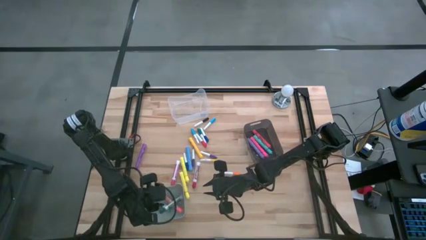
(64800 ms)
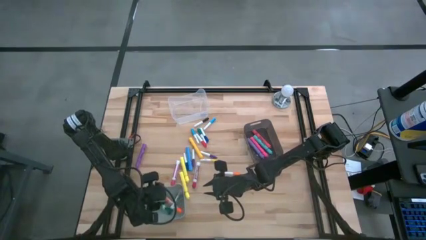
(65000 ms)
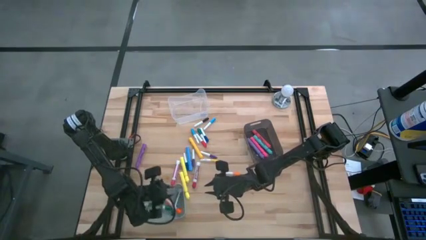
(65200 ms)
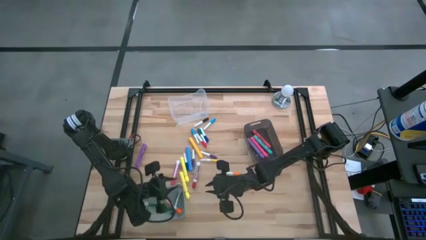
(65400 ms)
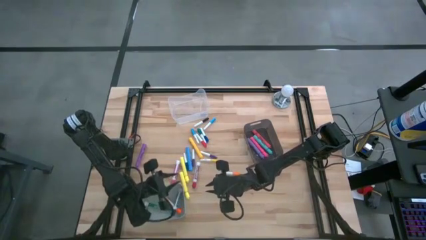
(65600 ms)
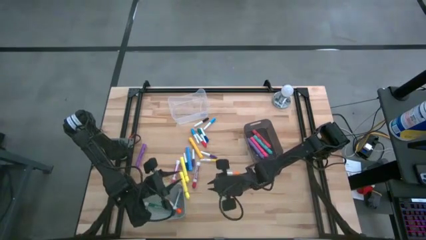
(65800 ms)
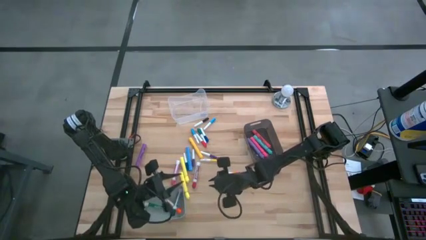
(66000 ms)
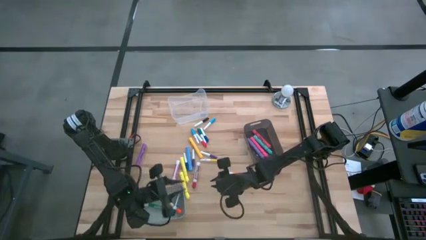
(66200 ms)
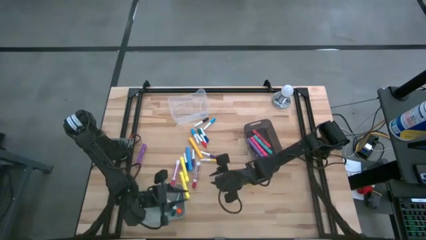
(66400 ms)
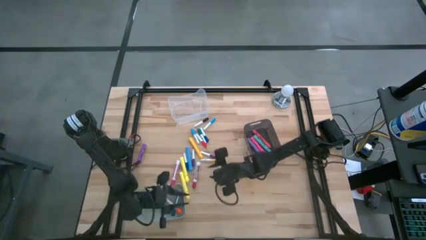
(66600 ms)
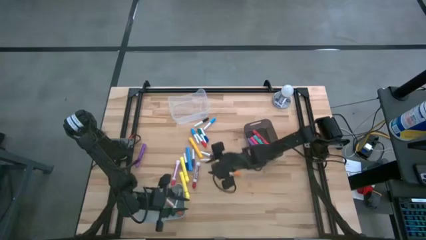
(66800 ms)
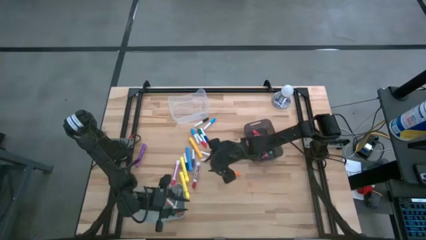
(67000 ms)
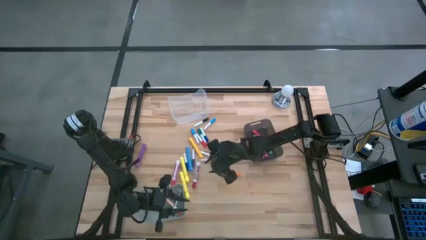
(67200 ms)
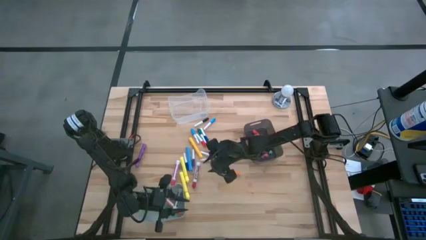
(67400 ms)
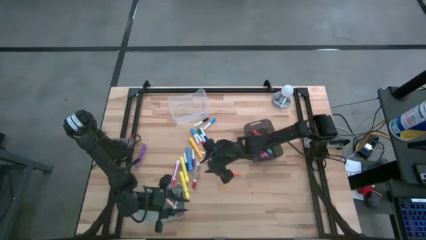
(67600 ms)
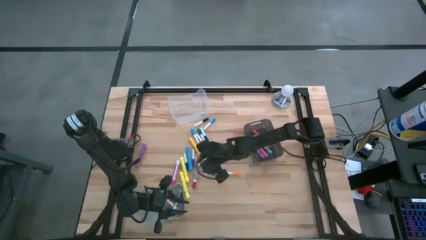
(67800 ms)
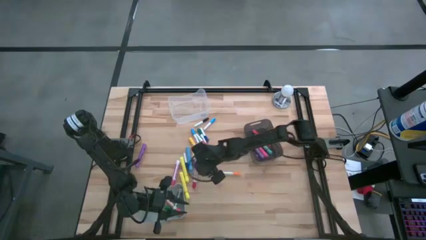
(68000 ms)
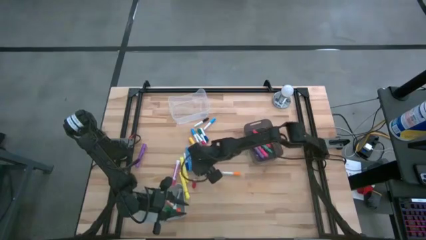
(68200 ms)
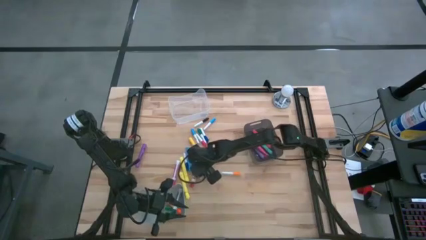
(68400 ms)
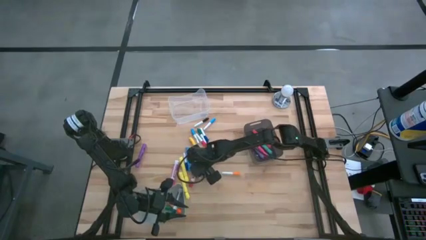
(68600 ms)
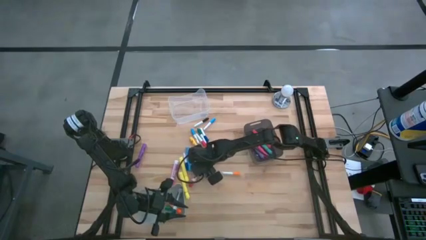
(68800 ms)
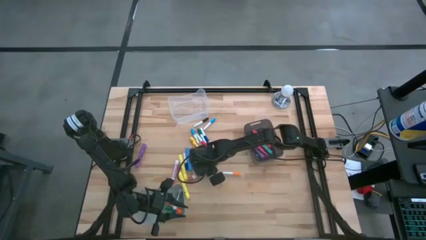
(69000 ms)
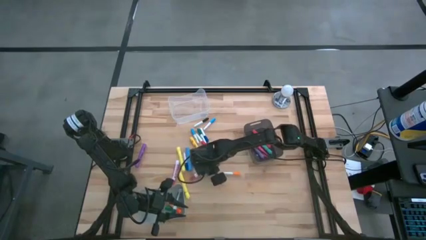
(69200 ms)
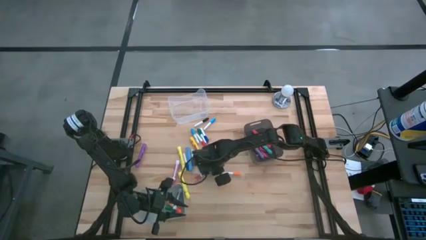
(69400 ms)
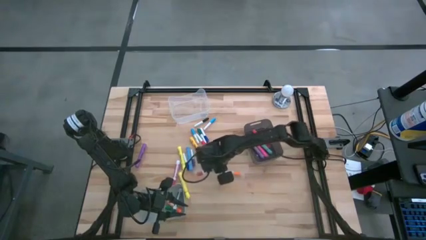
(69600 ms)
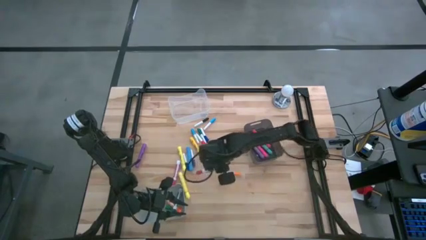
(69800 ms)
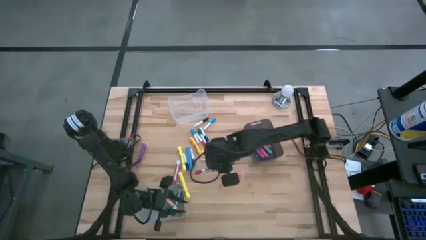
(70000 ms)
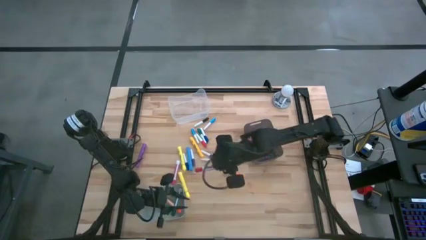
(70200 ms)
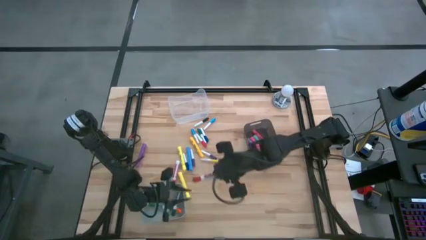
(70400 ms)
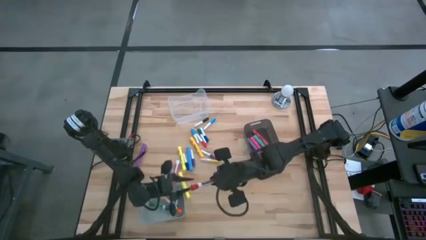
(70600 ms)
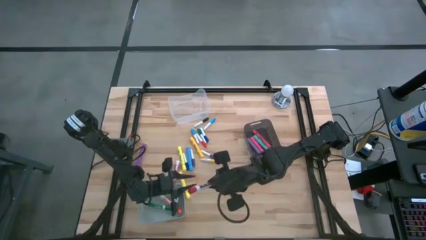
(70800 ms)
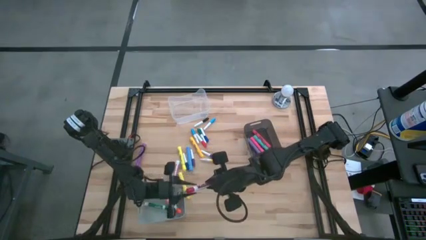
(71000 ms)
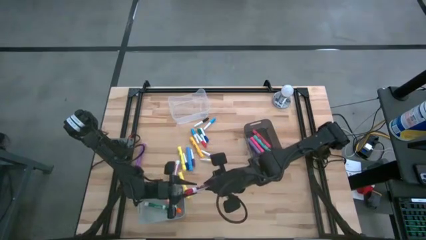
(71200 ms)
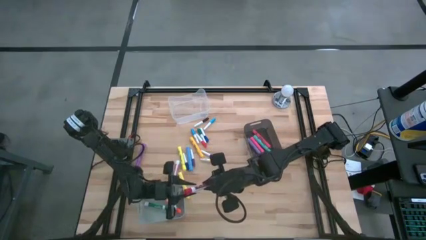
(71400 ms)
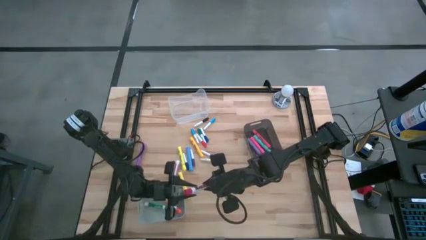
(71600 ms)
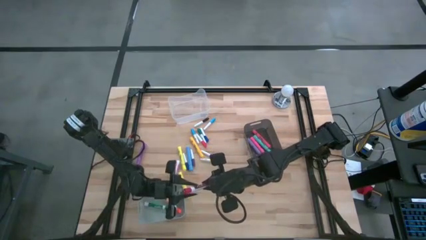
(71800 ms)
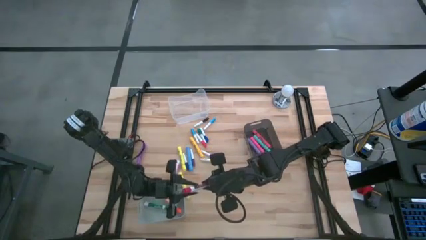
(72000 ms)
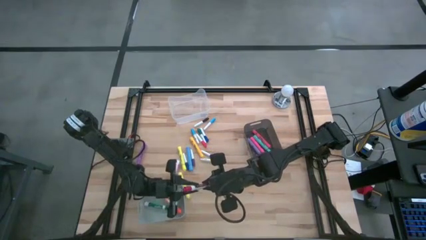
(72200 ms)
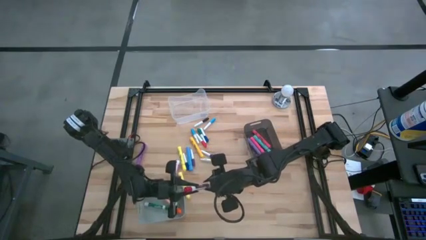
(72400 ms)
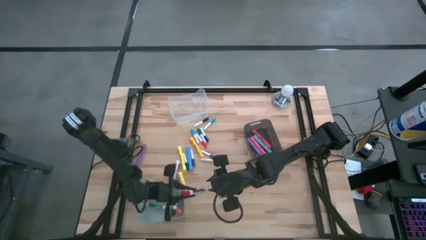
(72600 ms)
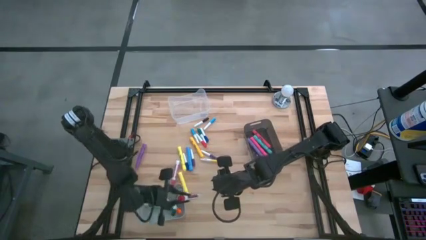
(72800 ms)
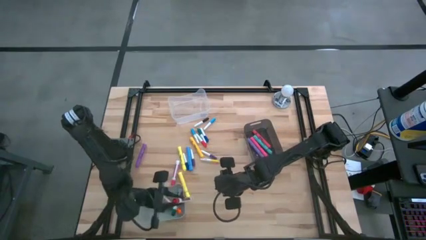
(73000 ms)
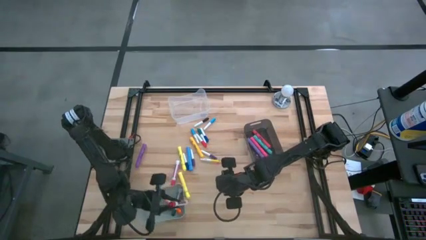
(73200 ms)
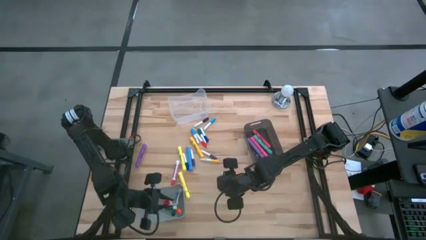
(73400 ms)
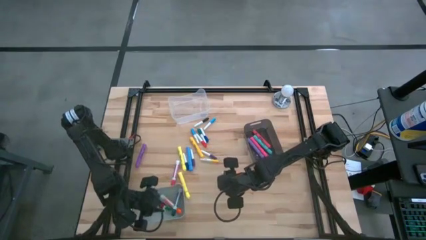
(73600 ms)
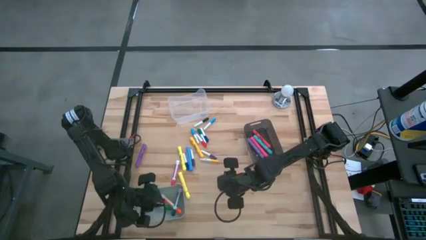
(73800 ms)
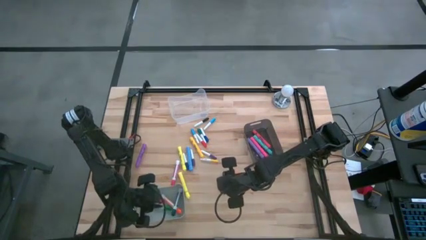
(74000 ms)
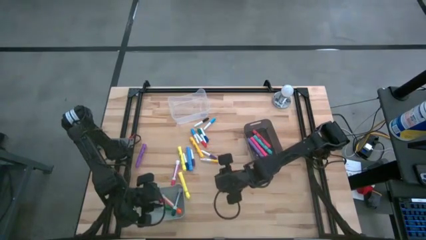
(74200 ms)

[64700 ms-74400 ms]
Task: Pick & Place Markers
Put the red marker pen into the gray bin

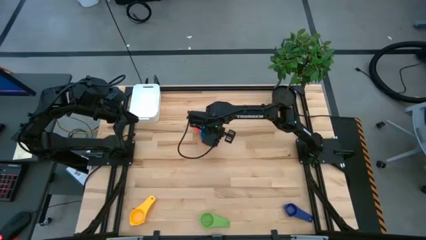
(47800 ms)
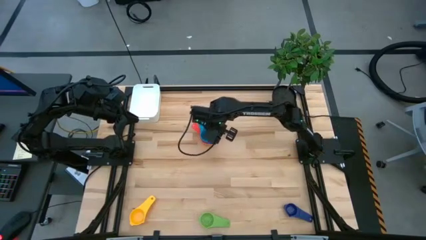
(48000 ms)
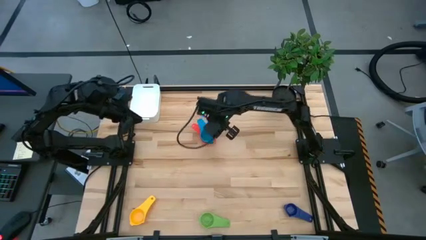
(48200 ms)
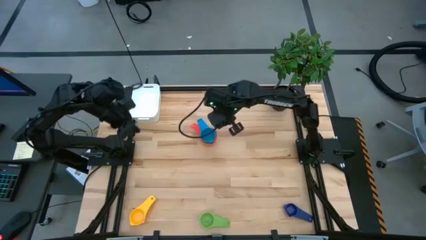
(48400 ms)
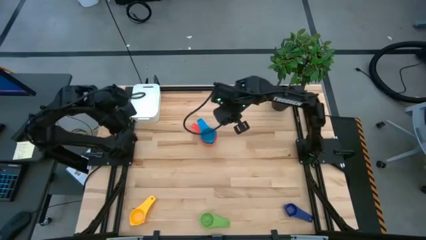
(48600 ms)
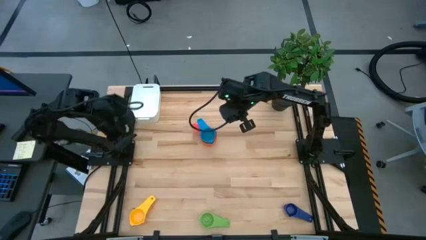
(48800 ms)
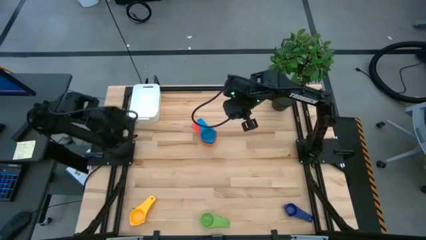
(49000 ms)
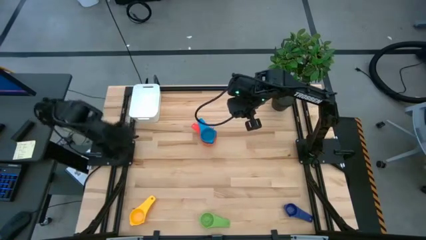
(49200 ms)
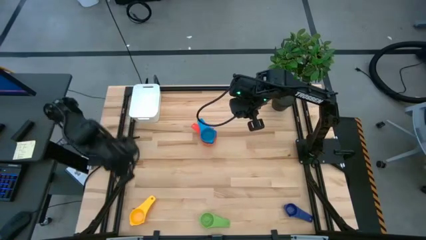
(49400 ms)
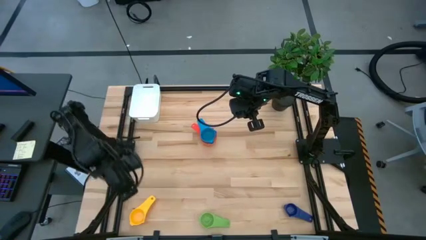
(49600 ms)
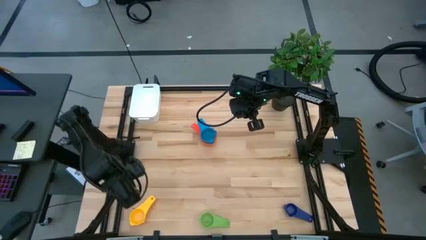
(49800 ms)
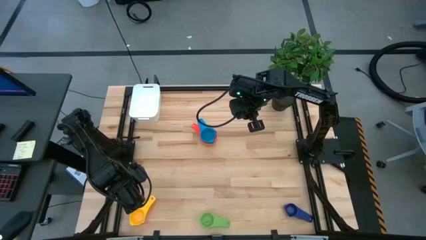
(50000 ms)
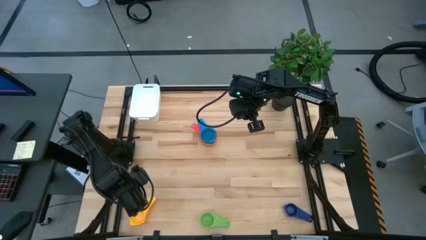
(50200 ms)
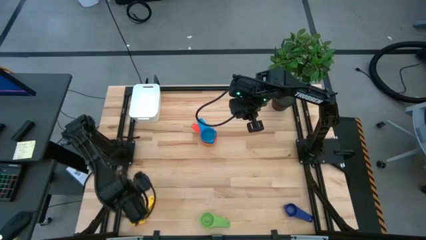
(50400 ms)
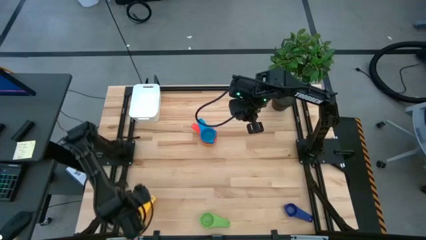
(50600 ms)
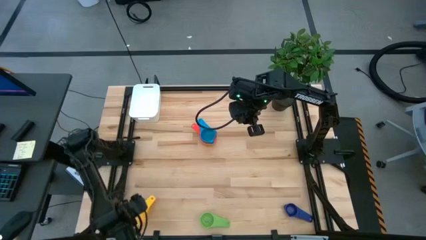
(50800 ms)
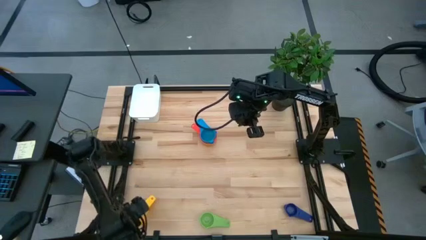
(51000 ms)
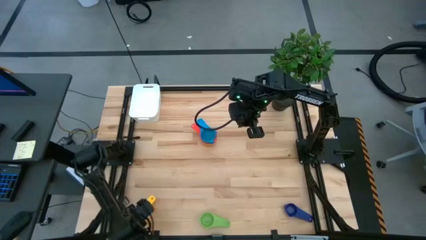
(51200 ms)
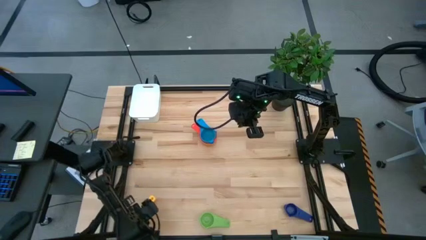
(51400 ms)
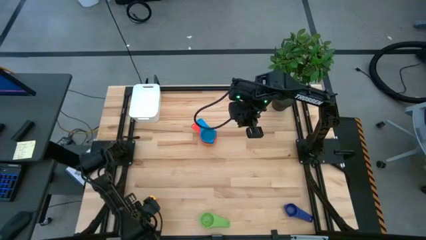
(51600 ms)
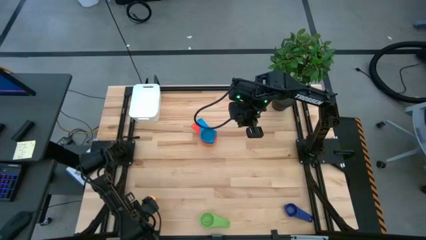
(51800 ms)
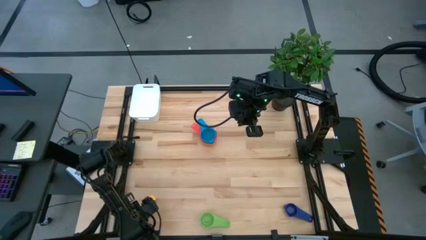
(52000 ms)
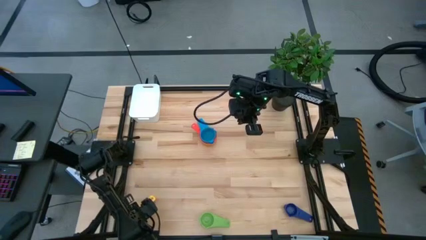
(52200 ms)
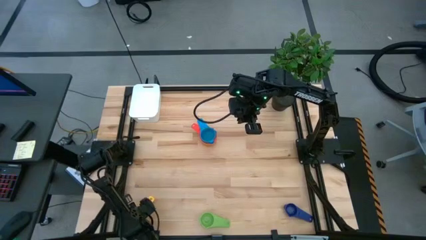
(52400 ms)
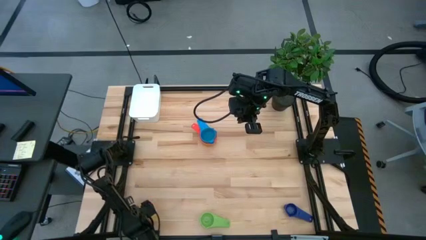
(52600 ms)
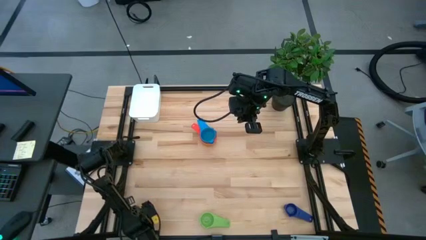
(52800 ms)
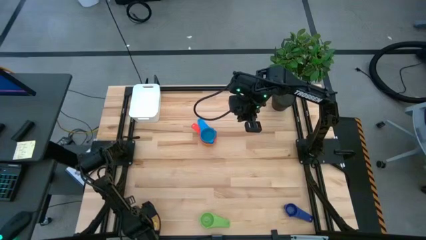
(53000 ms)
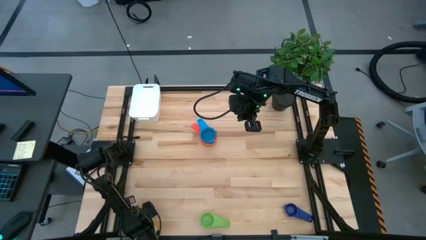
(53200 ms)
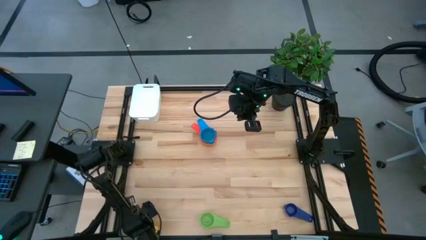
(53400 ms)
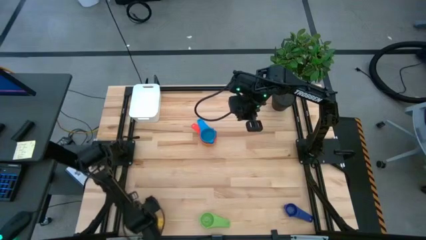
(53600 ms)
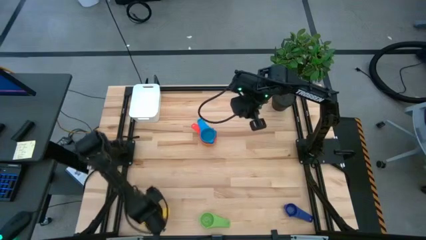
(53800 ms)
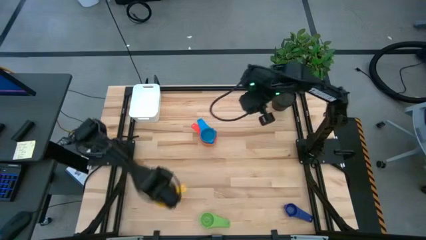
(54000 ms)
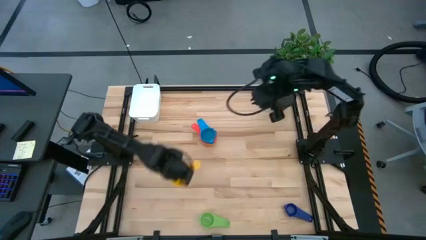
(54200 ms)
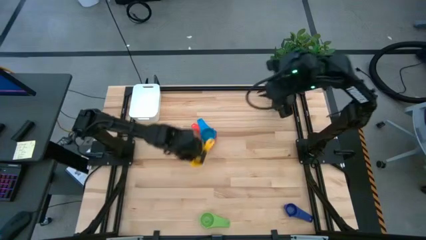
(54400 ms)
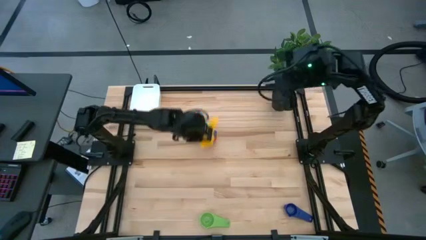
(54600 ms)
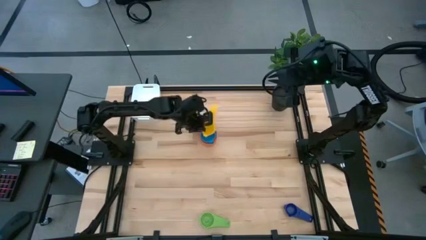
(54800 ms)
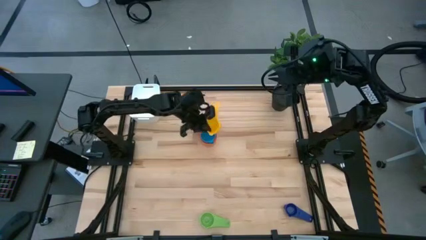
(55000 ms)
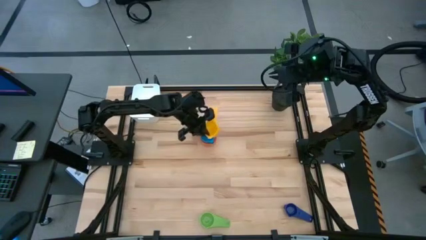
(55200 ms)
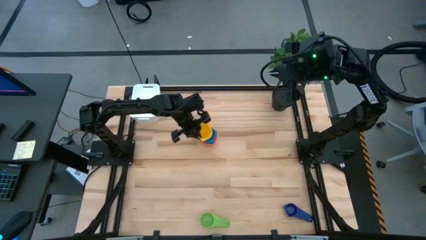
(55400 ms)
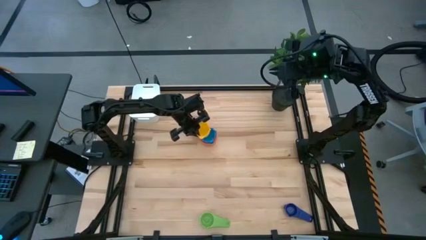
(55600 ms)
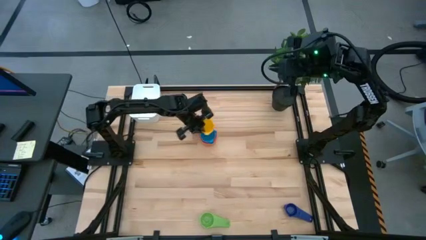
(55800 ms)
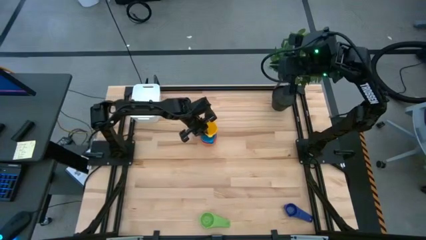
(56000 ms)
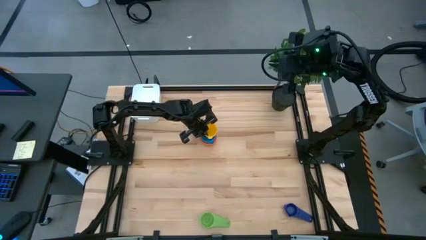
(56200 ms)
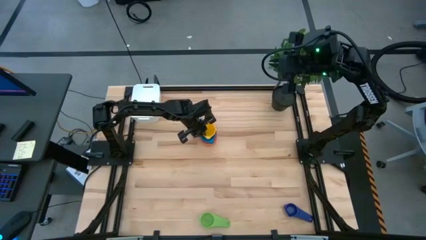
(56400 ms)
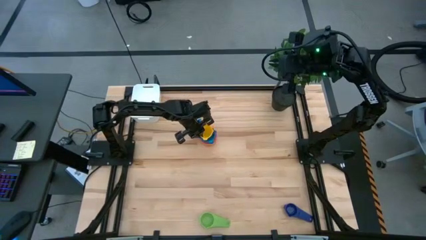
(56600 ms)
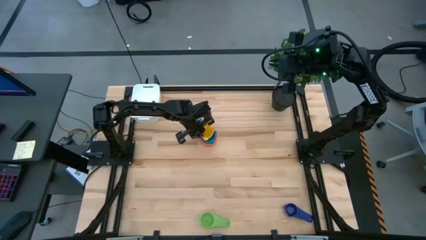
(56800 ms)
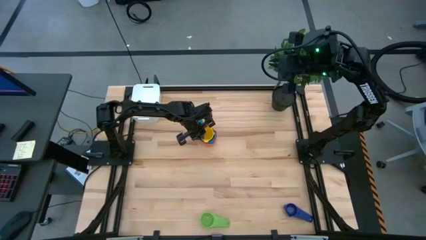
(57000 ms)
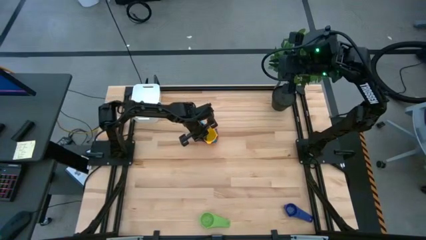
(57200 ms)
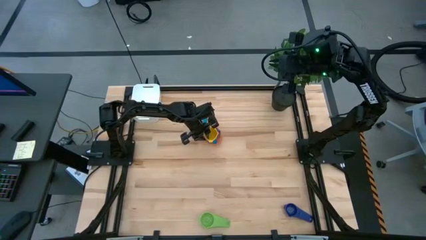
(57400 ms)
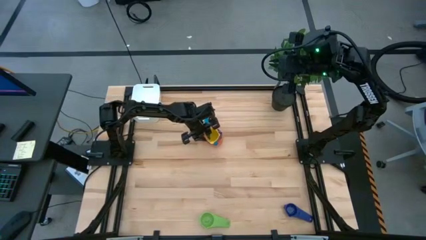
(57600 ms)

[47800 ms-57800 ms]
Task: Nest measuring cups in basket
Stack the yellow measuring cup on top of the light blue measuring cup
